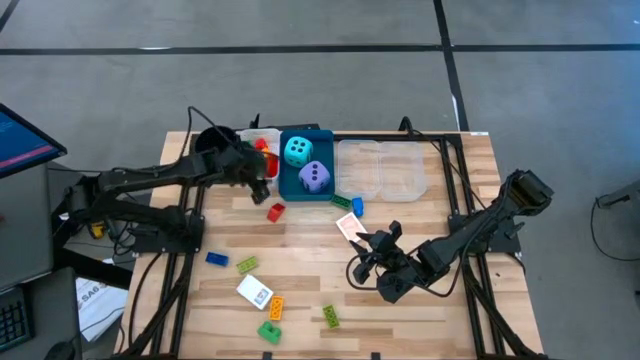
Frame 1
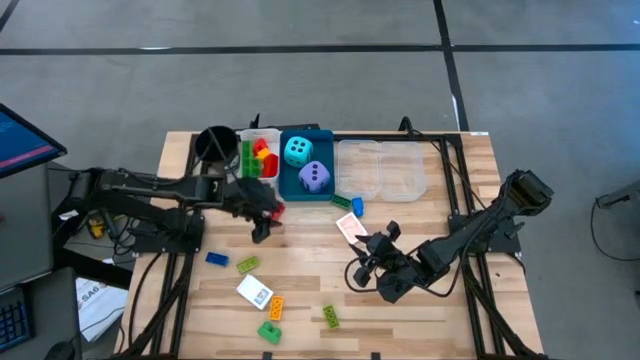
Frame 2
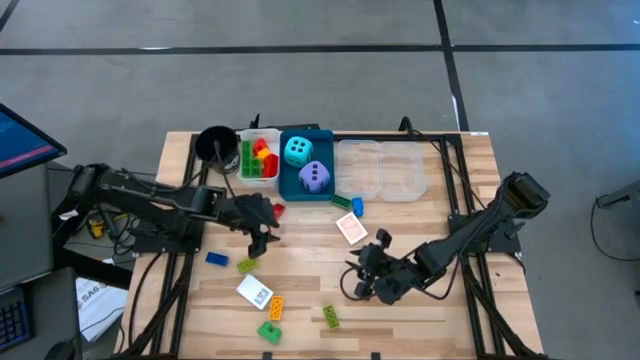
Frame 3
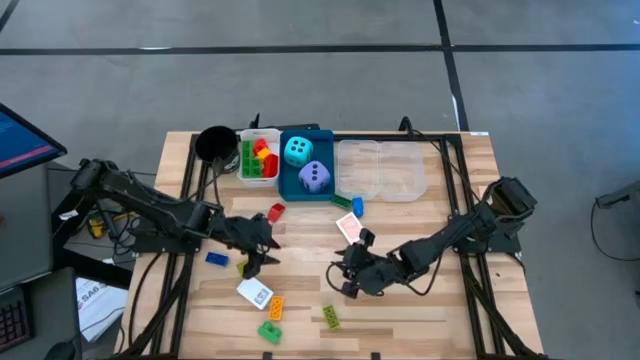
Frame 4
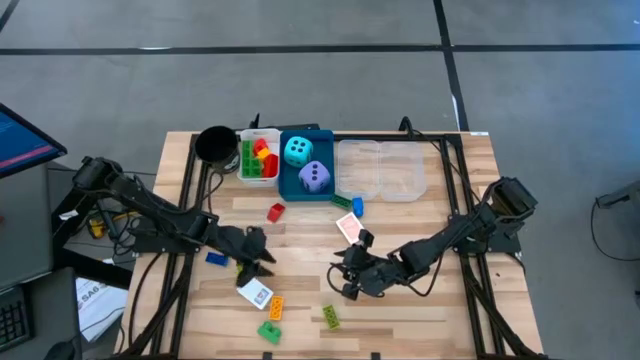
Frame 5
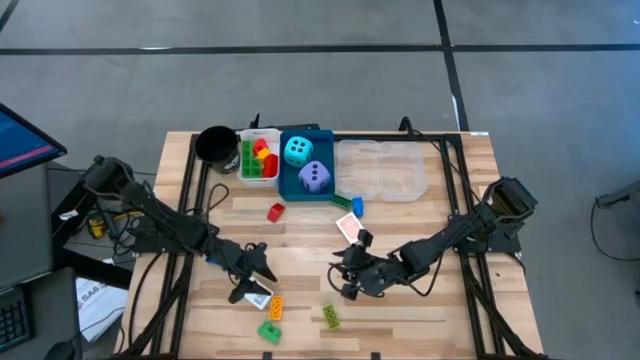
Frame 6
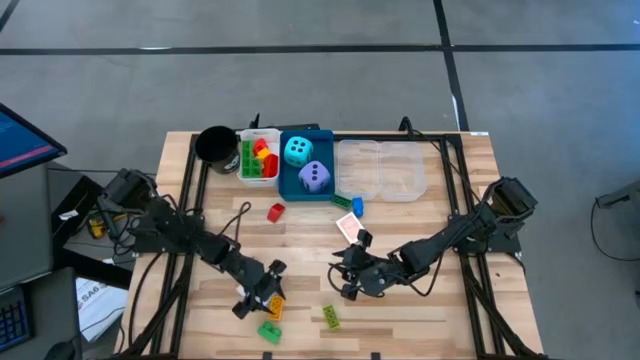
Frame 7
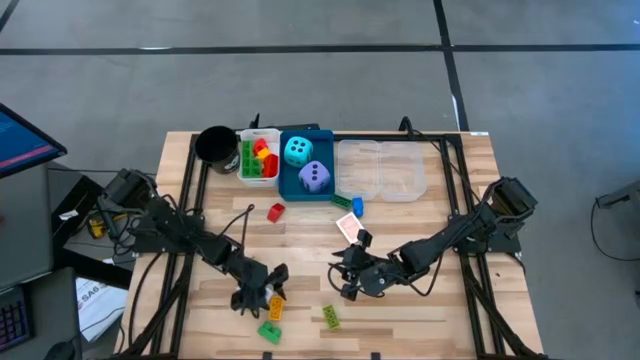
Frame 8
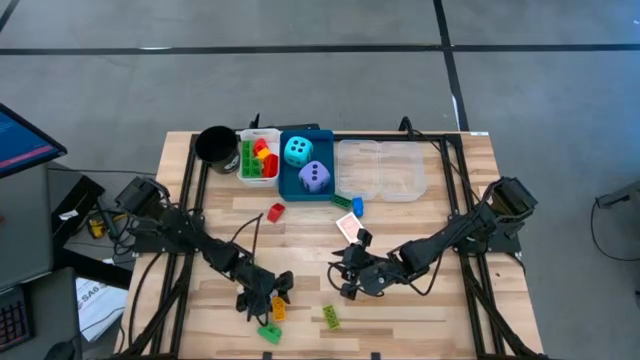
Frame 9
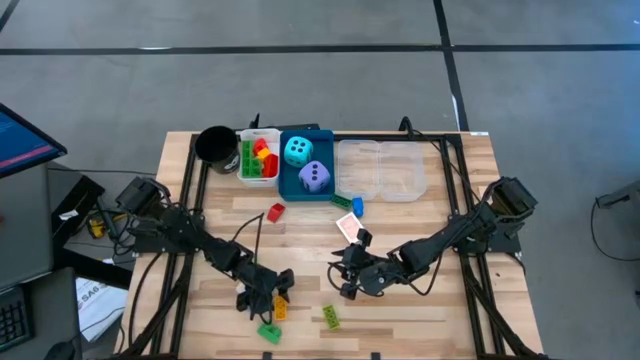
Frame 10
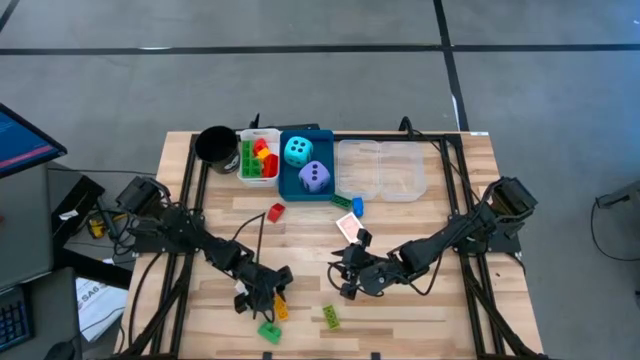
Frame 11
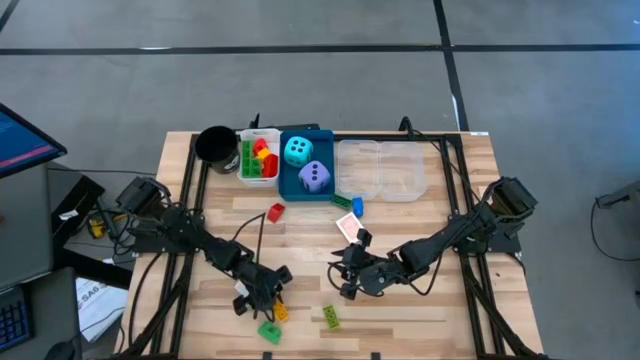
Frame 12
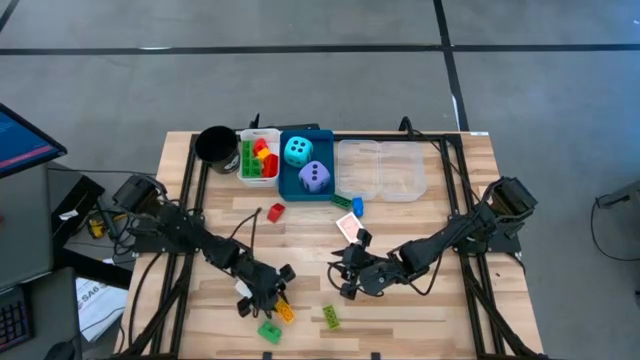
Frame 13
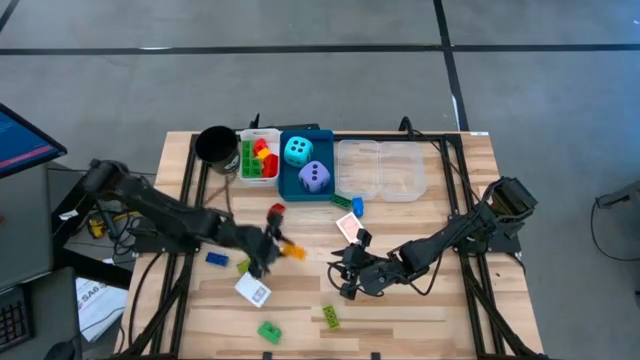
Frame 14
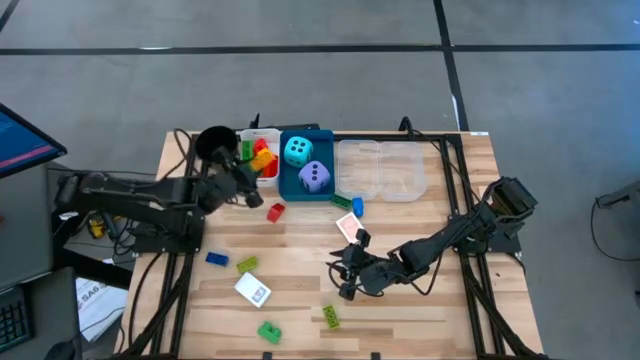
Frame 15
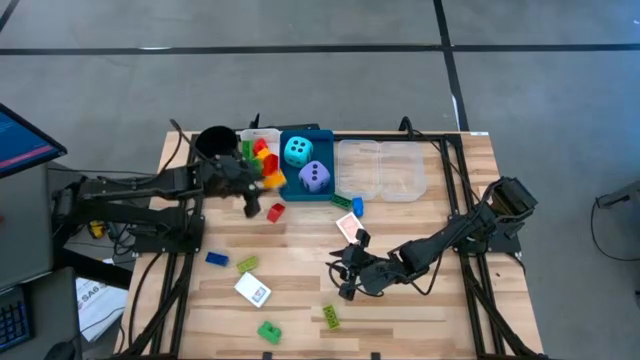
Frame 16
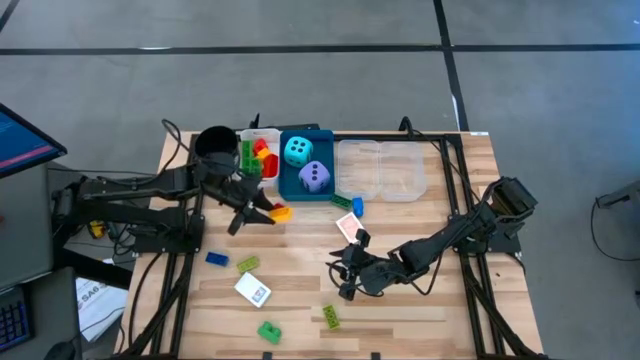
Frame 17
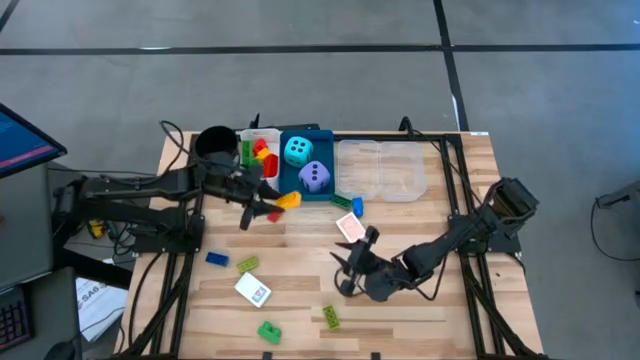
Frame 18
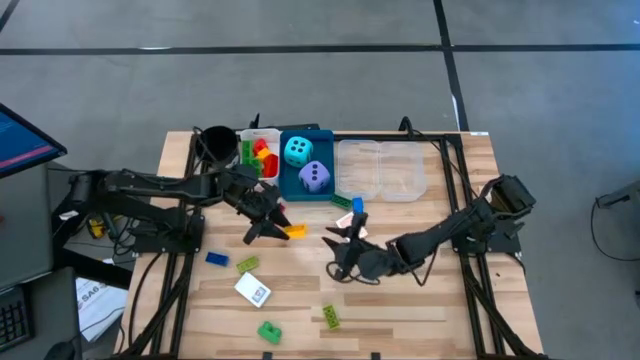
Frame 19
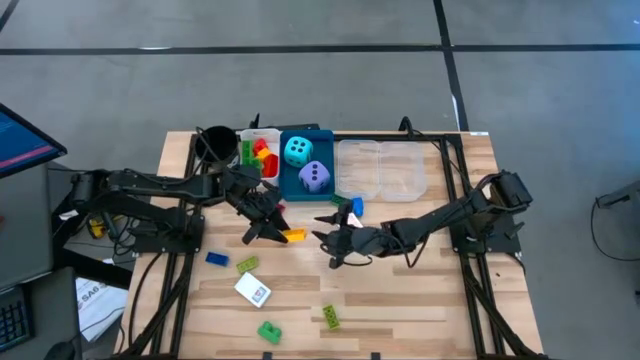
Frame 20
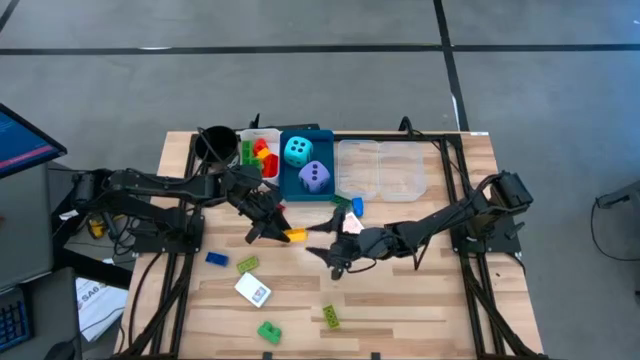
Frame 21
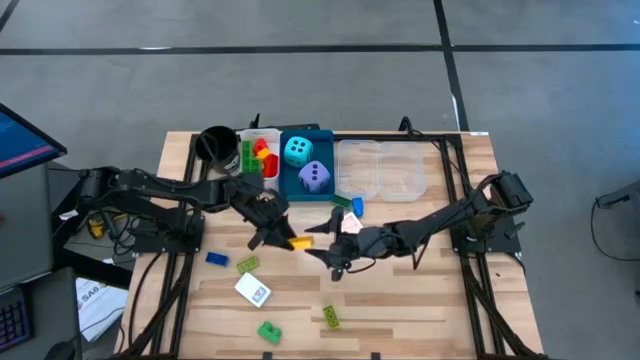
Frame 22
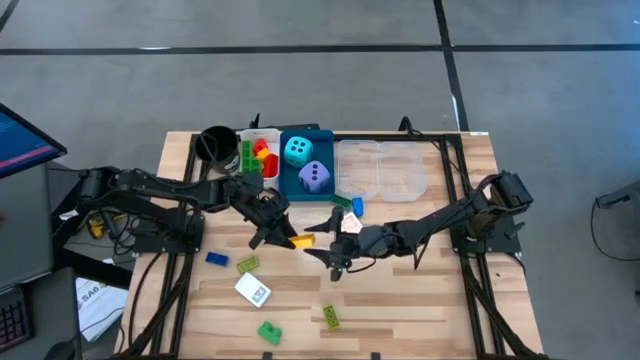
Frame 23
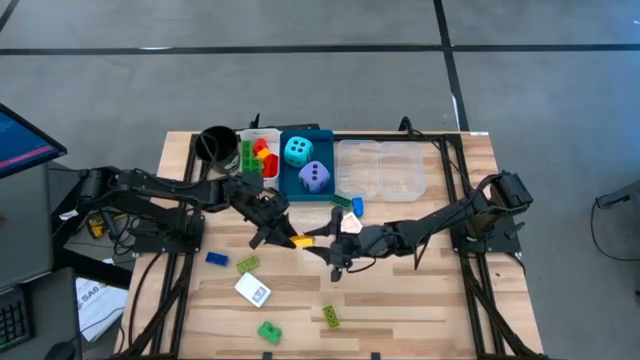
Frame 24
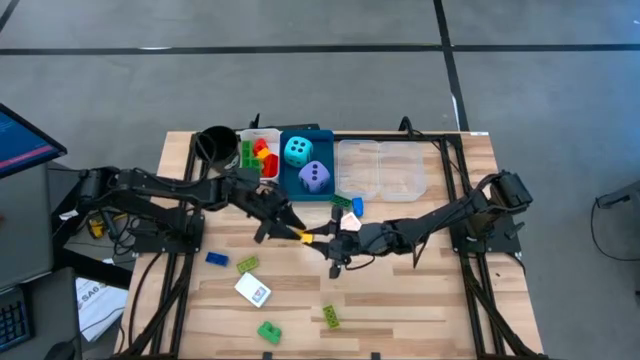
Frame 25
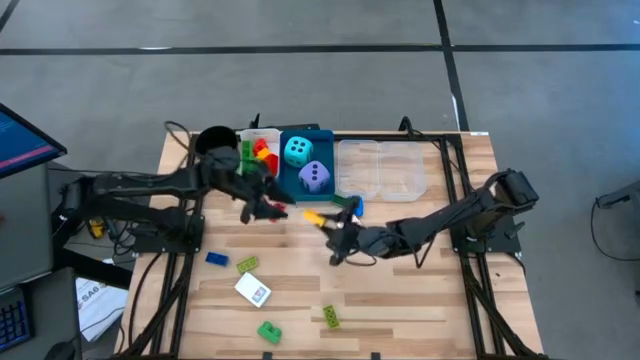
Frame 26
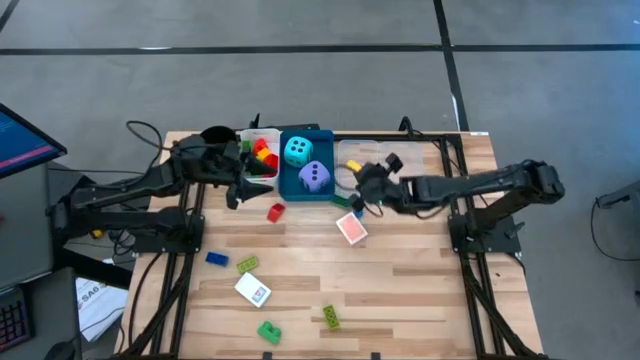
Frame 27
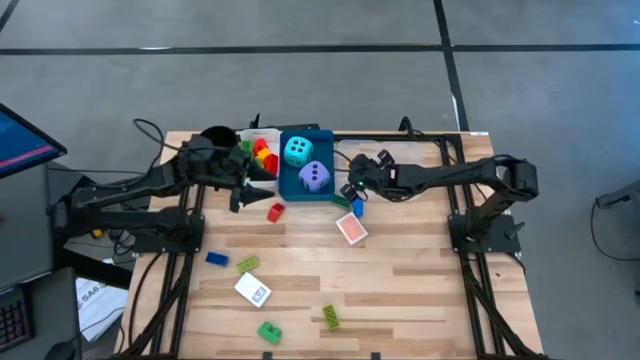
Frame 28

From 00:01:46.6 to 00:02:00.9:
Task: Pick & Place Toys
Put the small yellow game piece into the left transparent bin

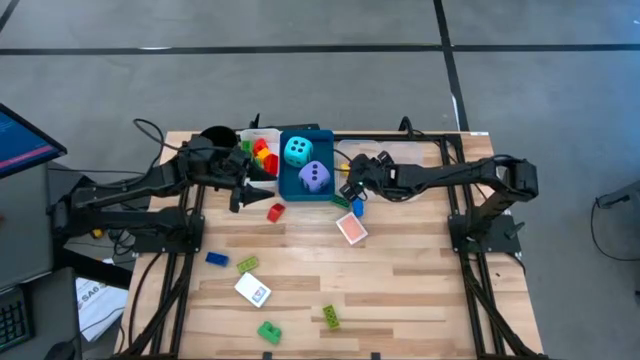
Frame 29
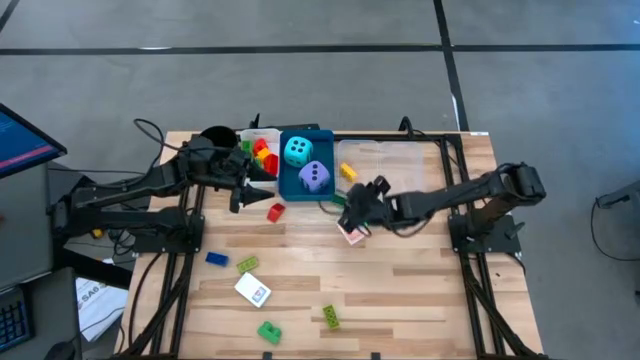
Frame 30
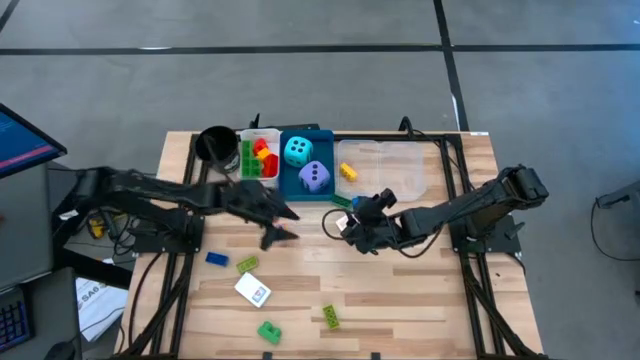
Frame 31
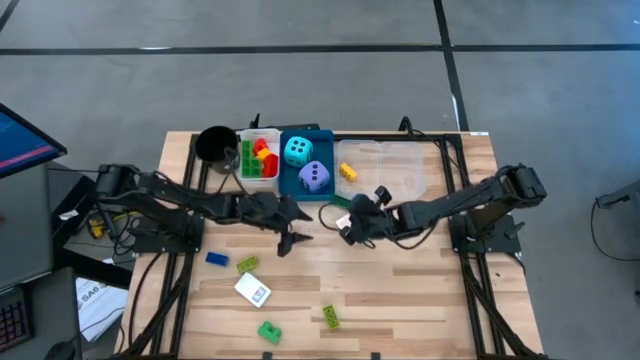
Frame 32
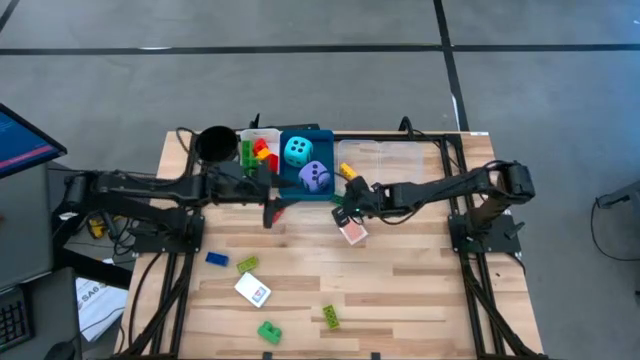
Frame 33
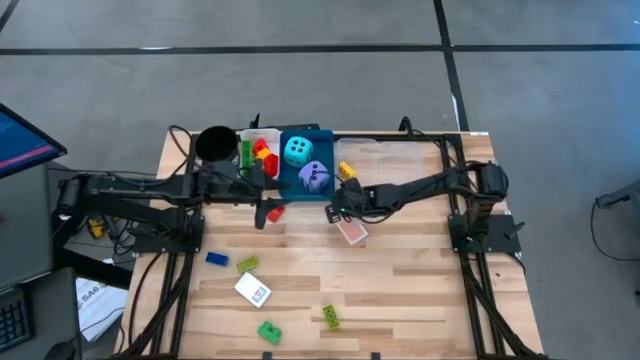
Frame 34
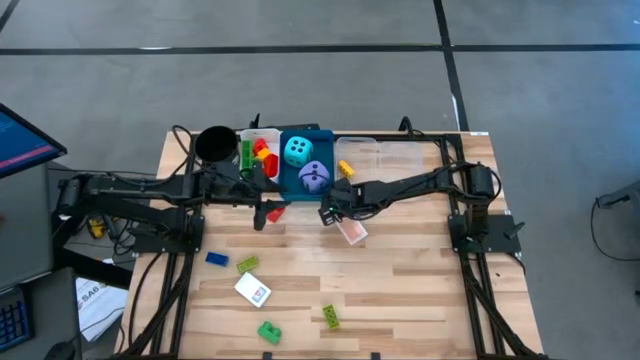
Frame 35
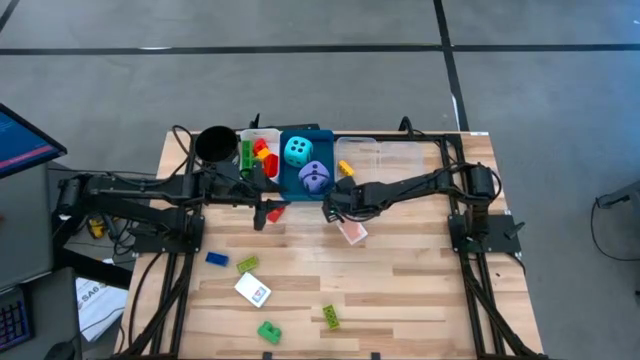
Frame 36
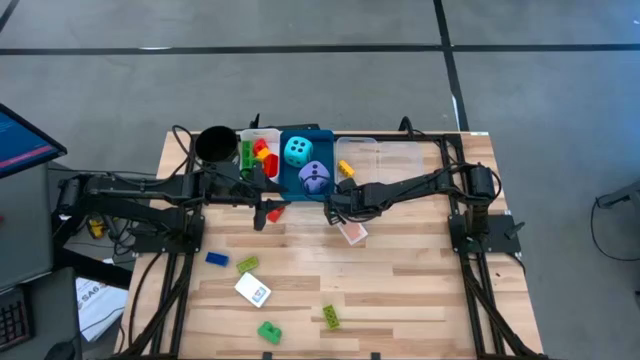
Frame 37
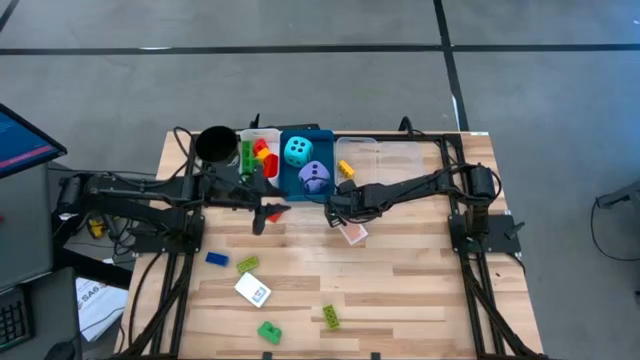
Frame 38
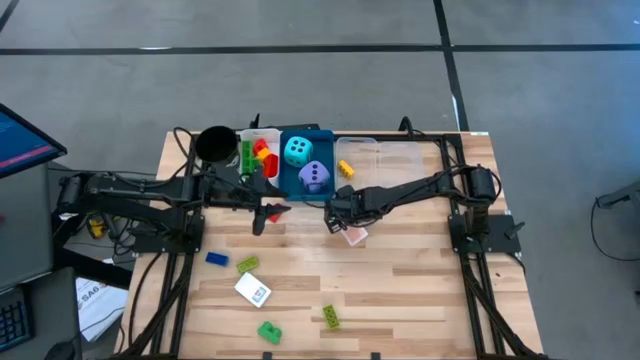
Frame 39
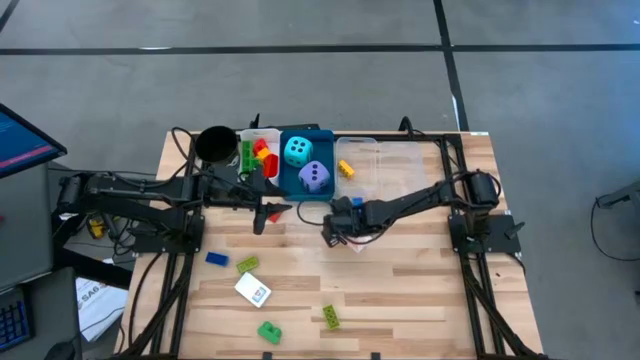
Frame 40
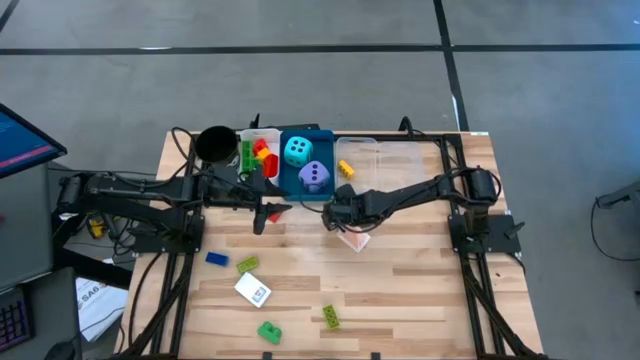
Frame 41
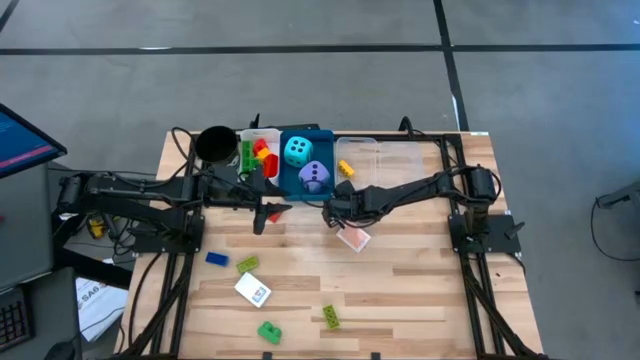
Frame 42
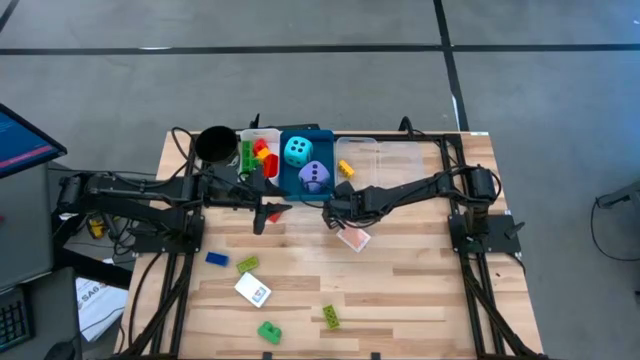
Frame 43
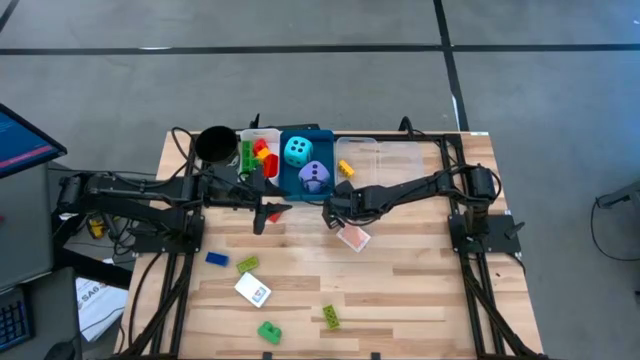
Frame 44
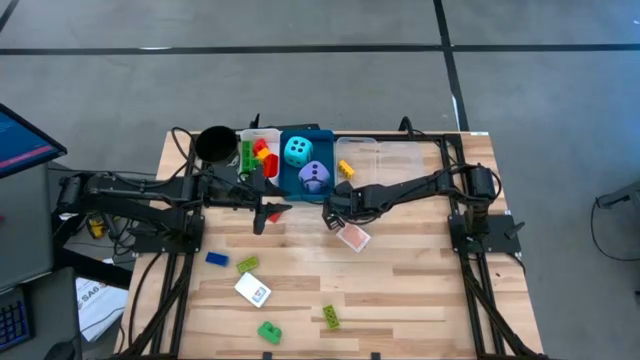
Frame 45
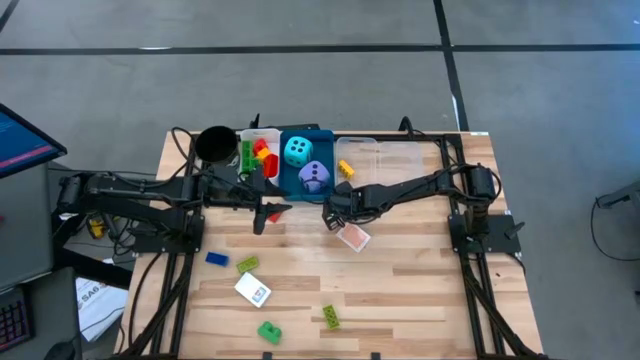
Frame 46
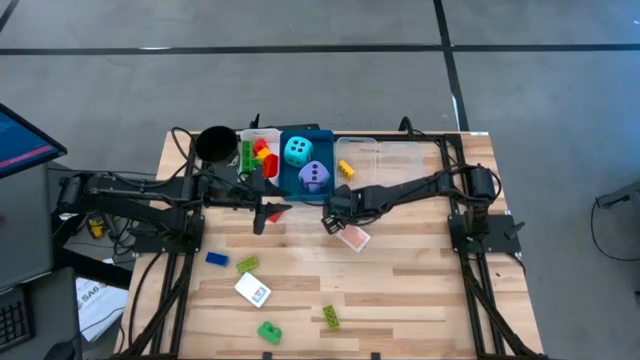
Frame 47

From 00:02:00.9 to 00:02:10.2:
Put the small dark green game piece into the left transparent bin
